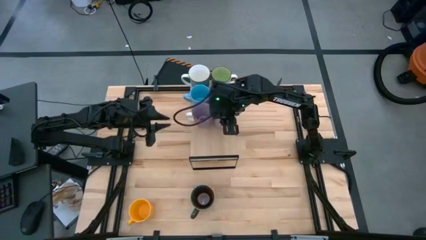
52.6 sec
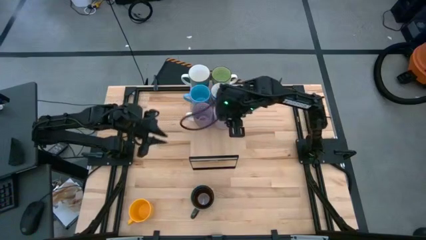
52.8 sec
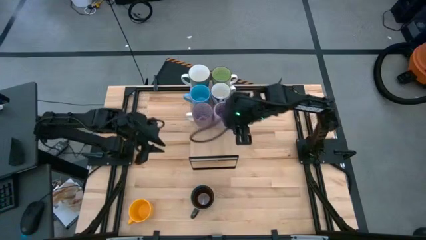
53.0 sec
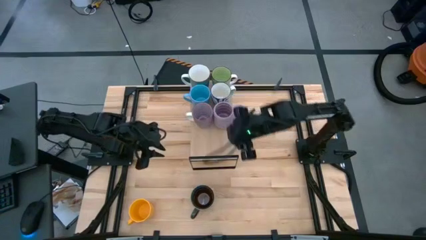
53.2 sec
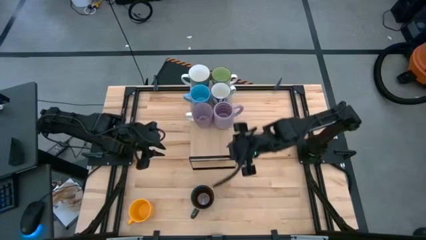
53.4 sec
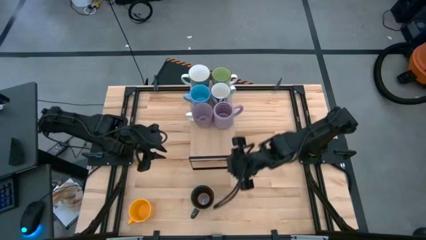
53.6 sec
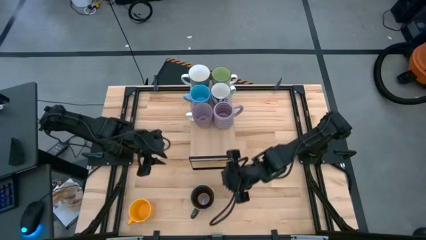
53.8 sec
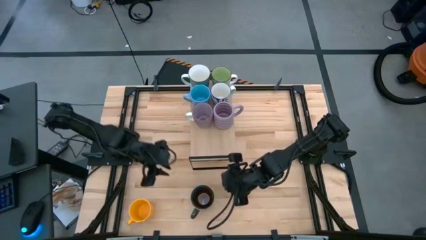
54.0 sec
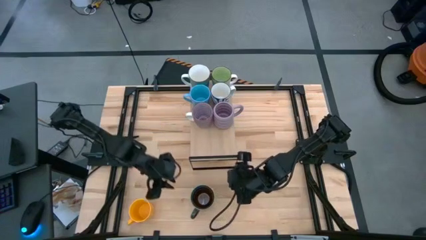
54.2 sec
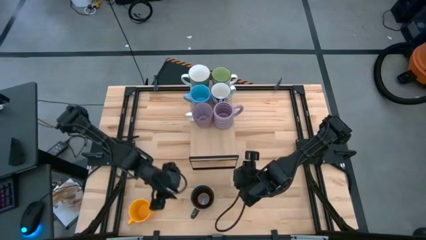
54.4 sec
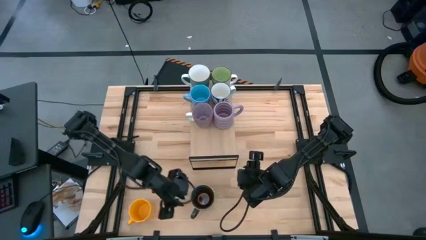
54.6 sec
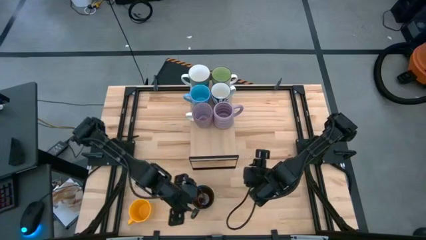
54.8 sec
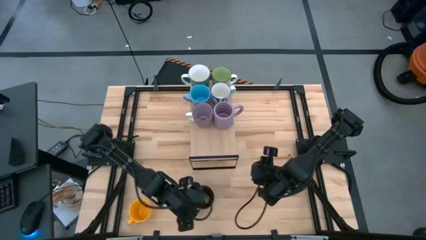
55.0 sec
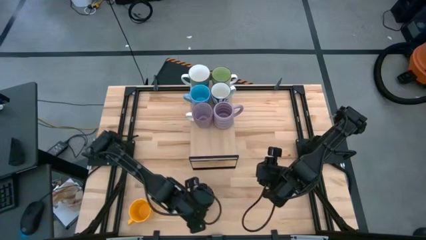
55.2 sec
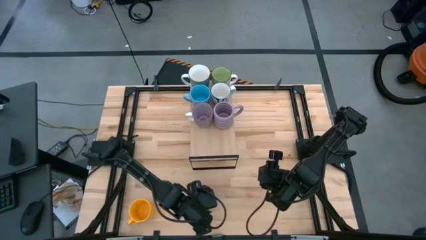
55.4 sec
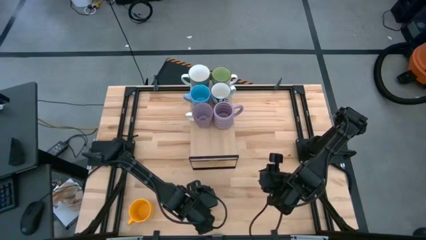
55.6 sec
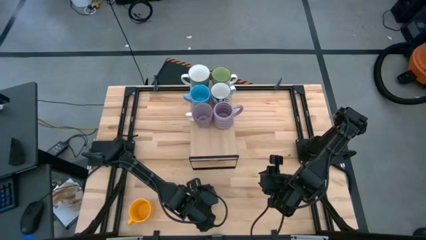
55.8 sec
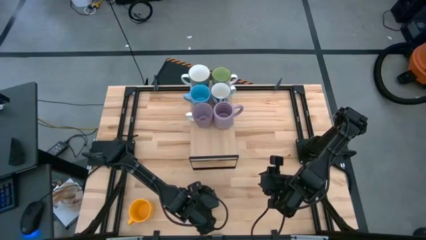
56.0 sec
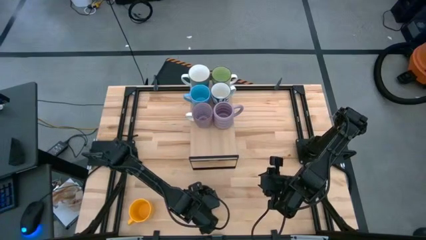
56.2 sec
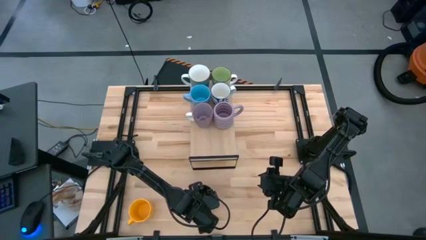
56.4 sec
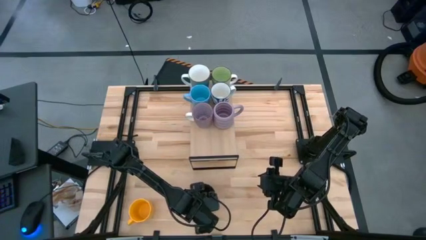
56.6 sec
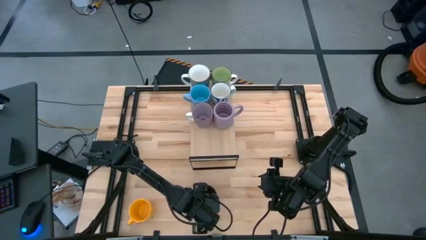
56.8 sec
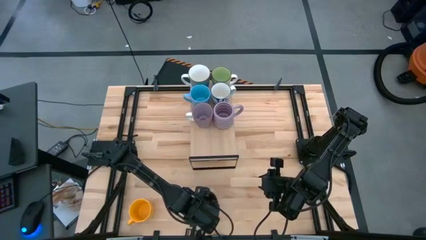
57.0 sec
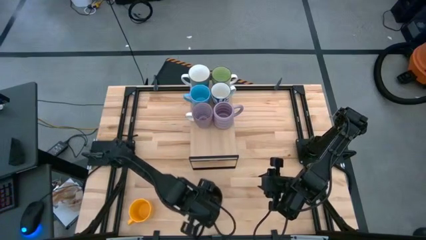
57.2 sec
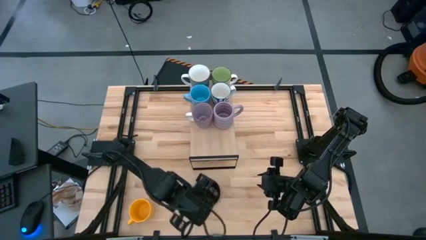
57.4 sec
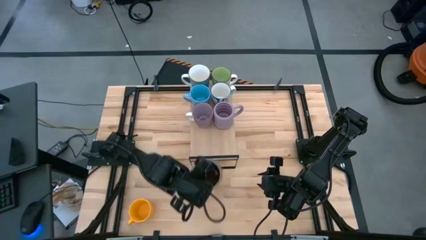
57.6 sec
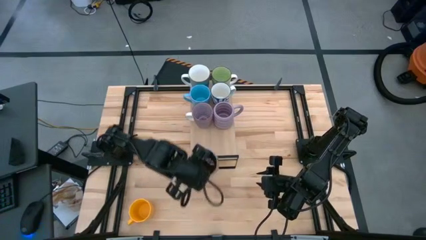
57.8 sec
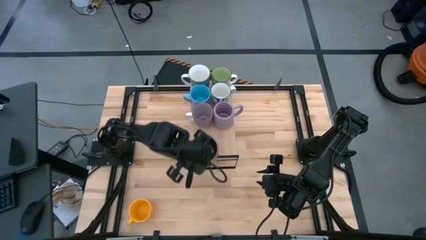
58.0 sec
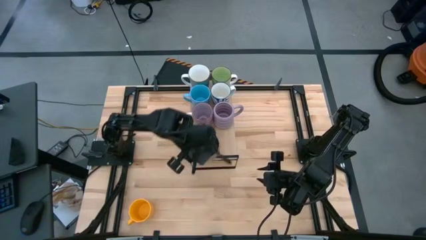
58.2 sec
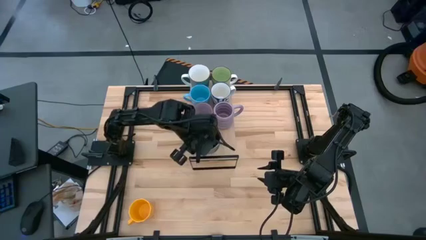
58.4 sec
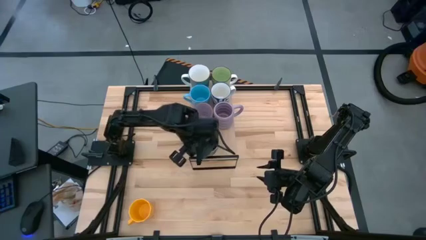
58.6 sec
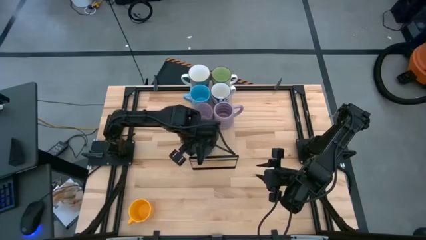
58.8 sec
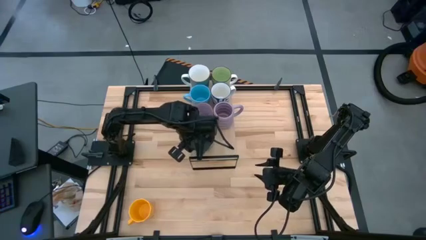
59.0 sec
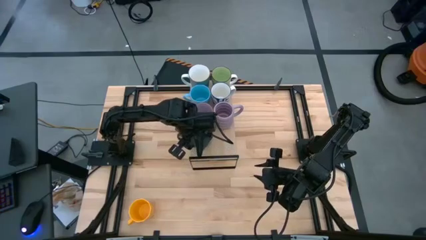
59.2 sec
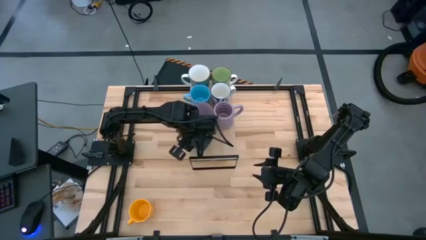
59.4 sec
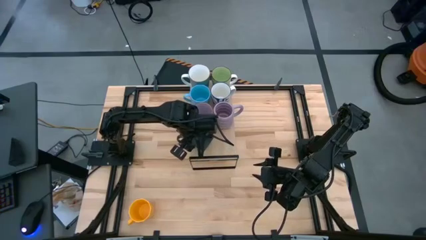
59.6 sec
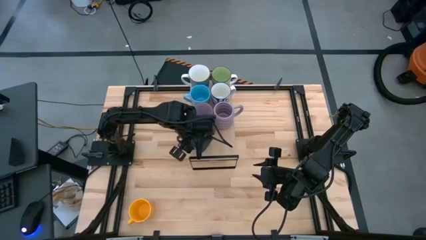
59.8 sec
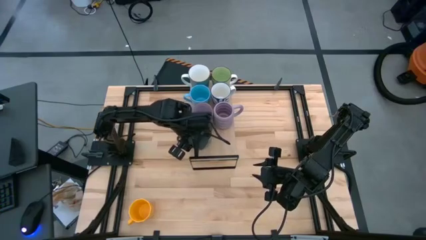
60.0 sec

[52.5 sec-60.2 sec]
Task: Place coffee mugs
Put the green patterned mug on the shelf

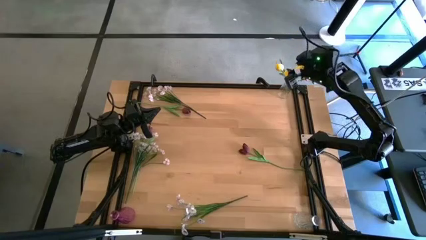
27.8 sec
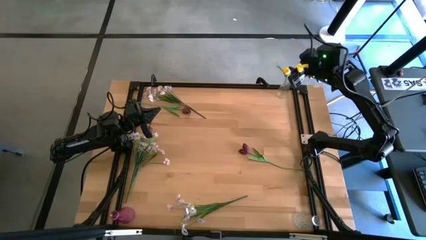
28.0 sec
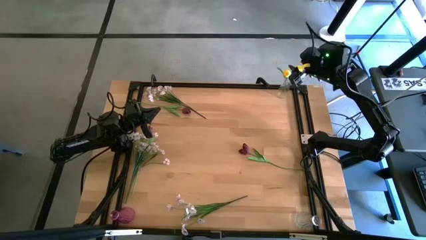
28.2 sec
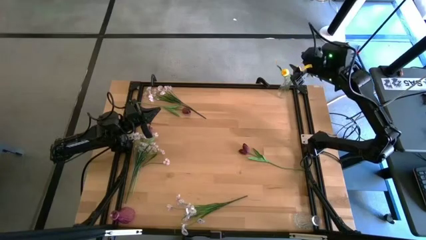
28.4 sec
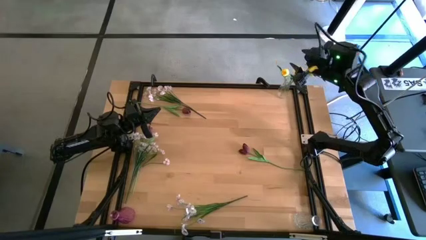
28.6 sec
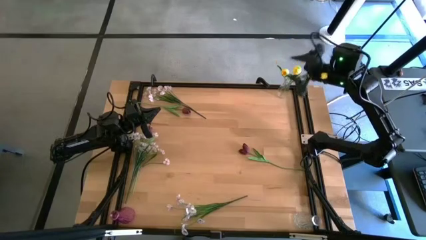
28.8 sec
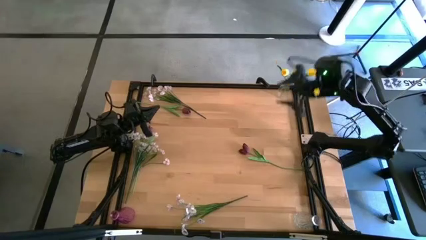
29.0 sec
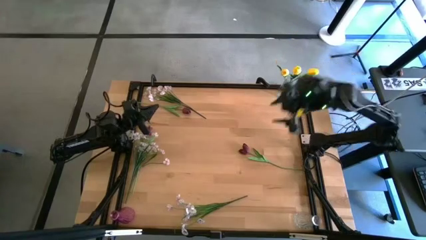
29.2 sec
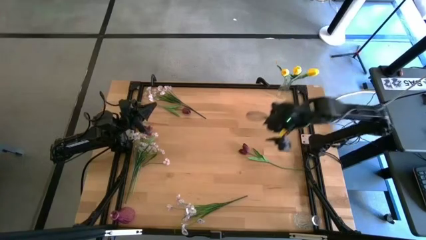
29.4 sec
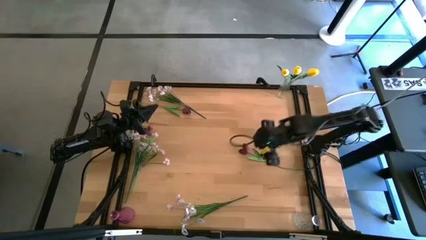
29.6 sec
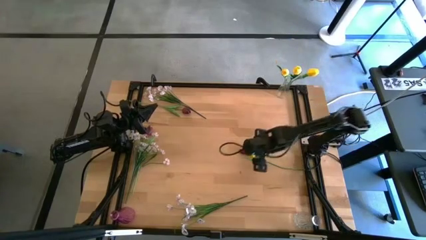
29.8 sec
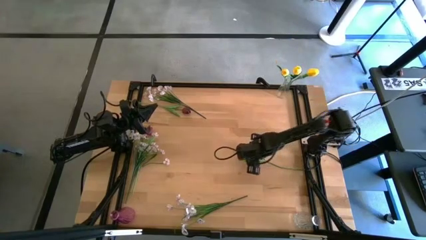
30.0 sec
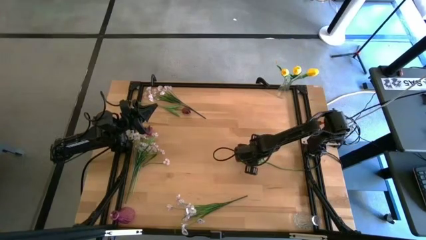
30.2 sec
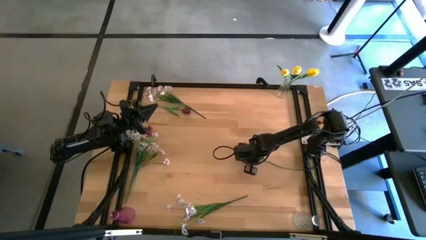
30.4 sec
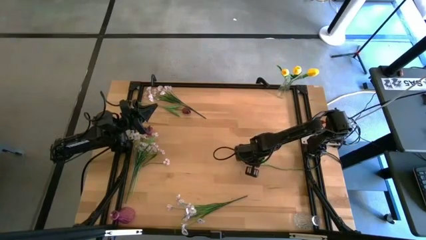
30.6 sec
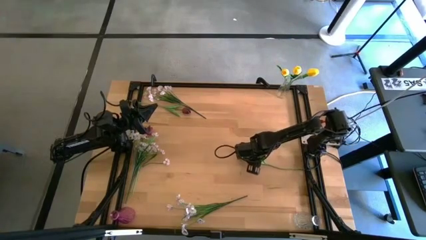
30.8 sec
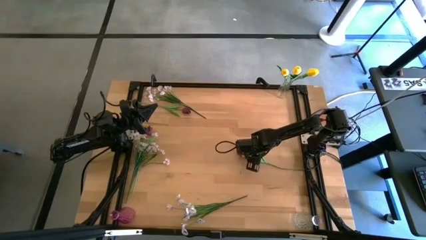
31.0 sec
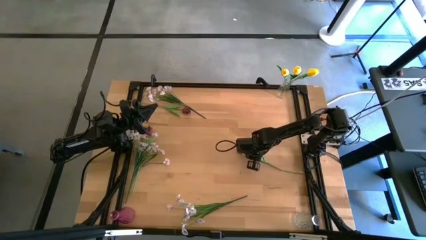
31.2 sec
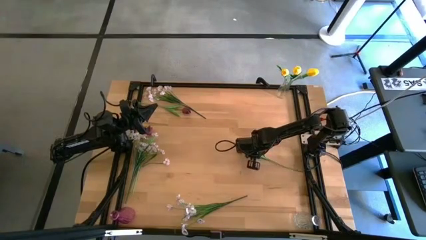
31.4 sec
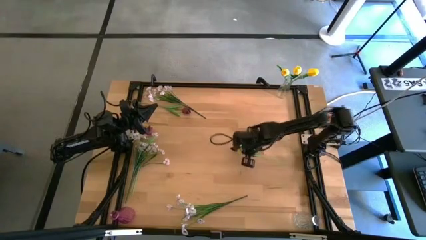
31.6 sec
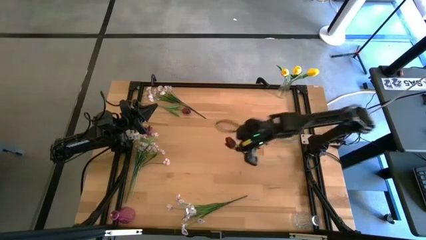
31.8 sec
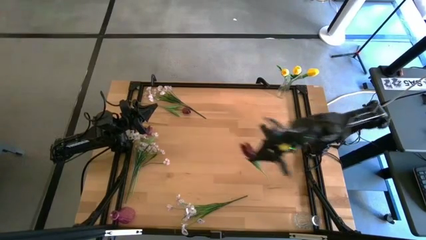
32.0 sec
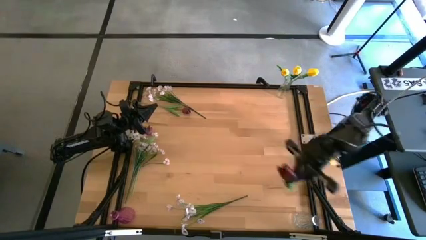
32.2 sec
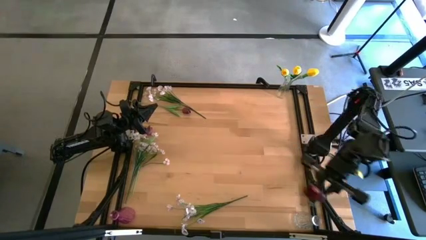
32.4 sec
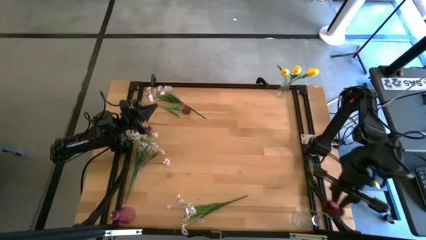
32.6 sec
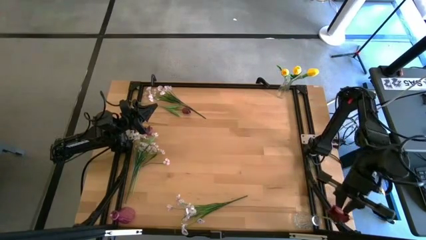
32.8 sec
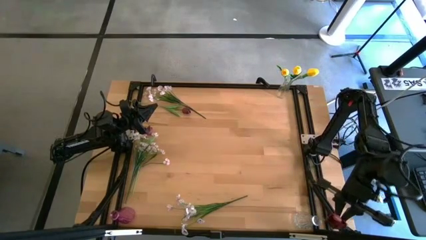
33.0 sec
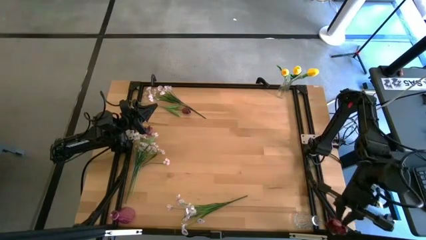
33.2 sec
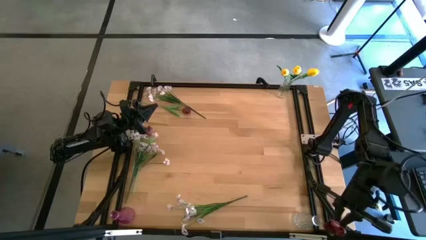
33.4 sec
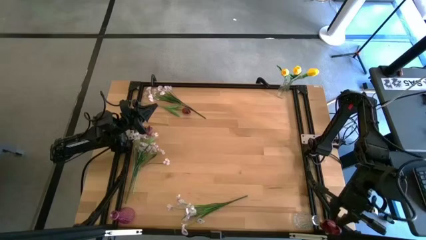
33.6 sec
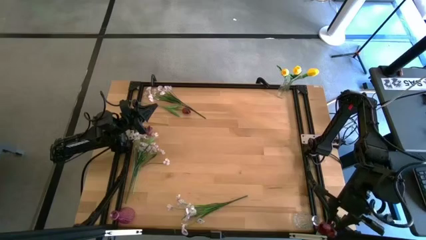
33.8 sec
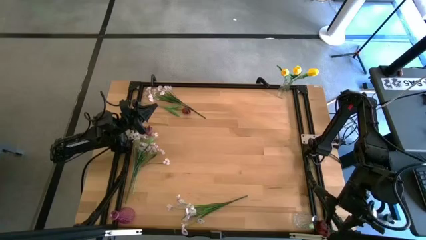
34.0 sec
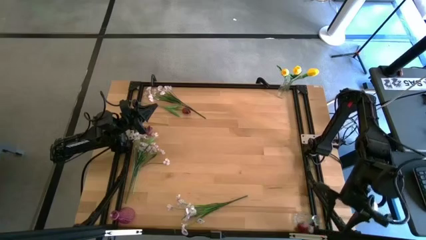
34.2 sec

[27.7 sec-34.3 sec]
Task: Sort flowers into vase by color
Put the right red tulip into the white crystal vase
